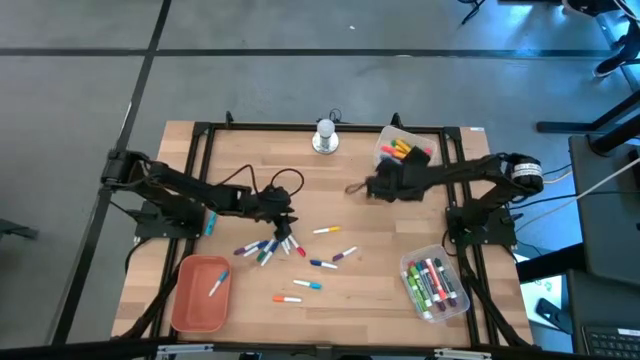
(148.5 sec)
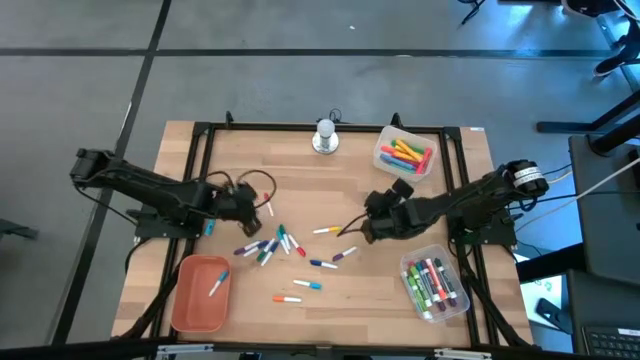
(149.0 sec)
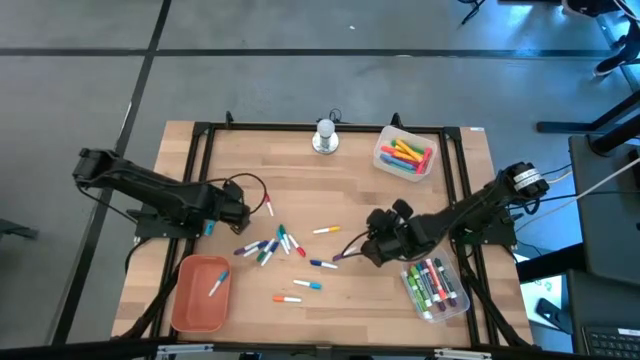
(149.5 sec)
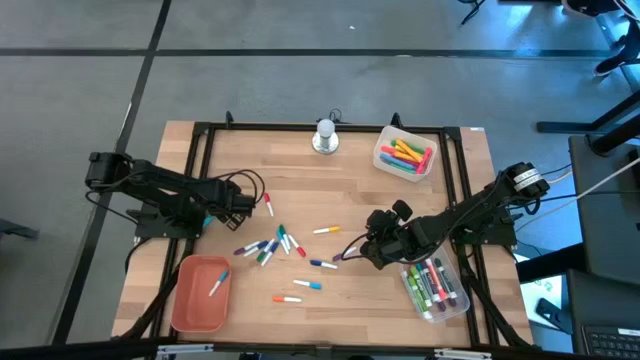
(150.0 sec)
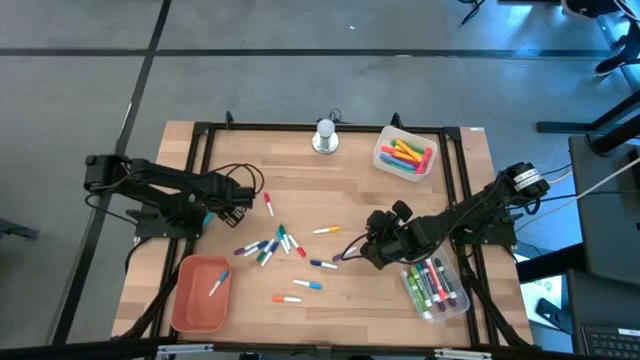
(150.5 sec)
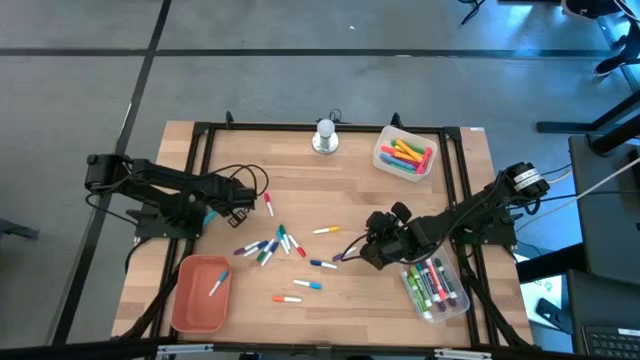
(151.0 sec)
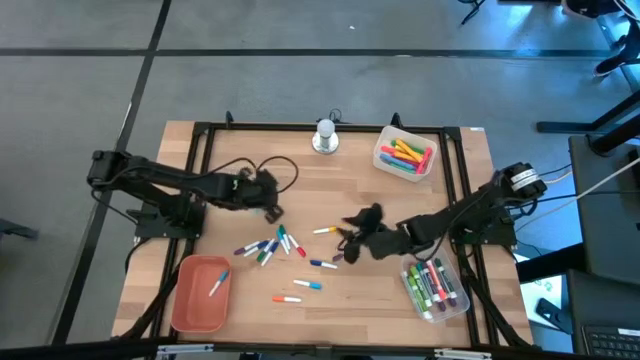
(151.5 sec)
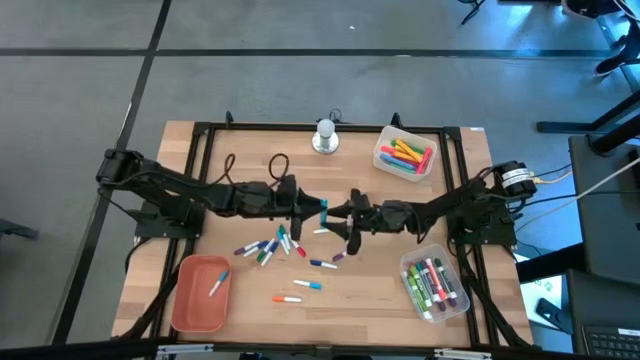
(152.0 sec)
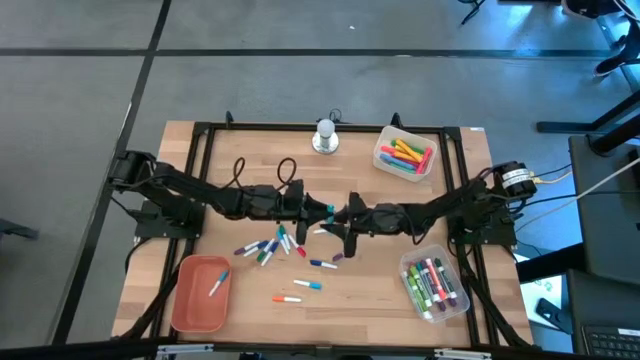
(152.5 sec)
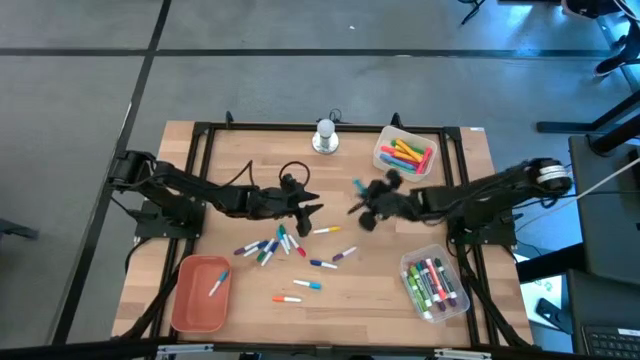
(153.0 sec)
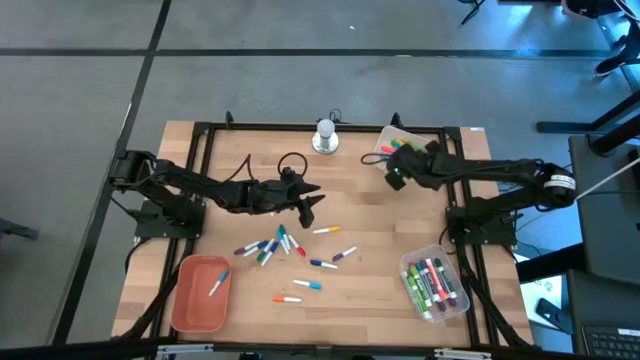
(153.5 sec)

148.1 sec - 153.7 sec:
Task: Pick & Place Markers
Put the large blue highlighter pen into the white bin

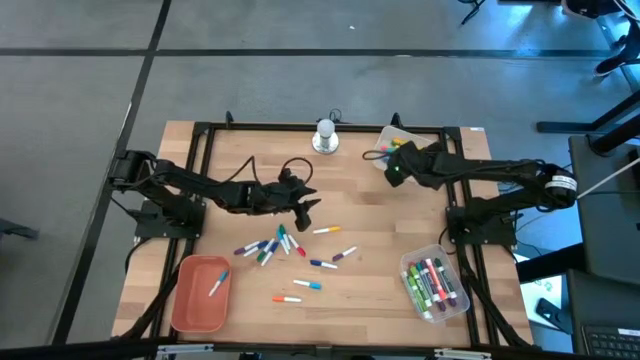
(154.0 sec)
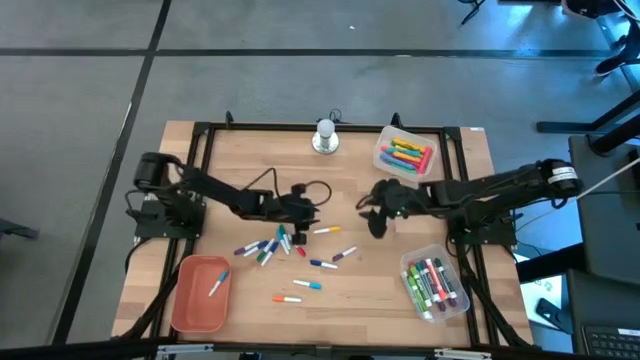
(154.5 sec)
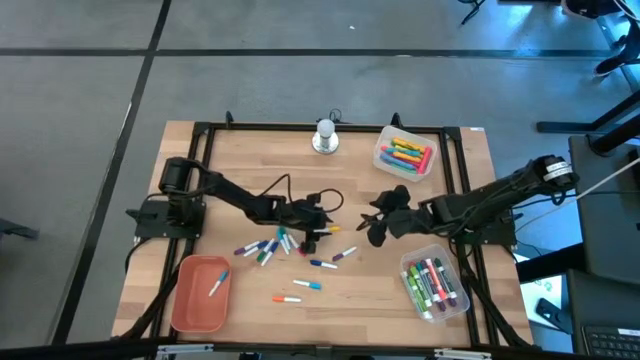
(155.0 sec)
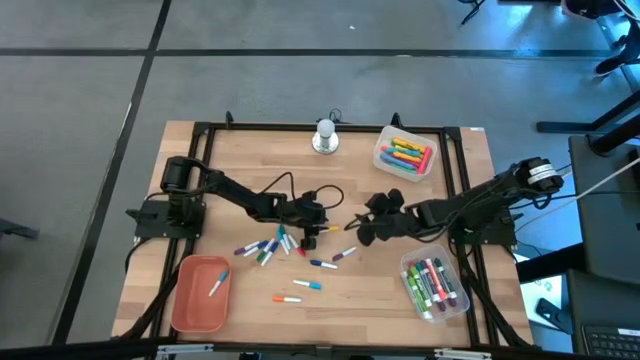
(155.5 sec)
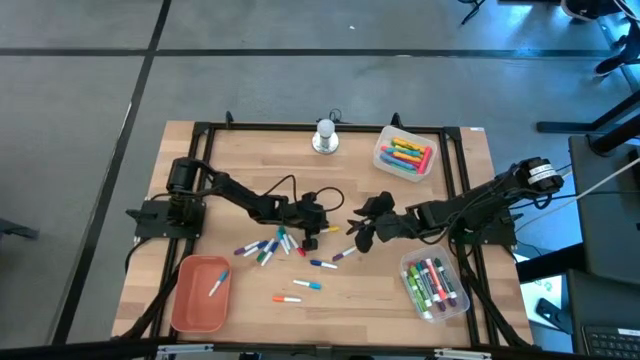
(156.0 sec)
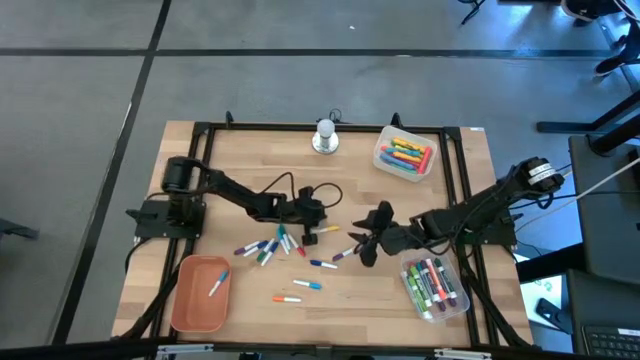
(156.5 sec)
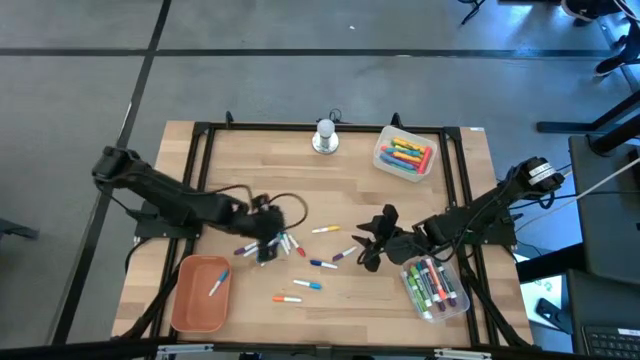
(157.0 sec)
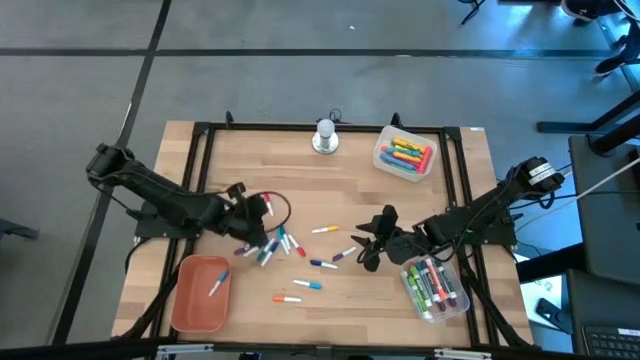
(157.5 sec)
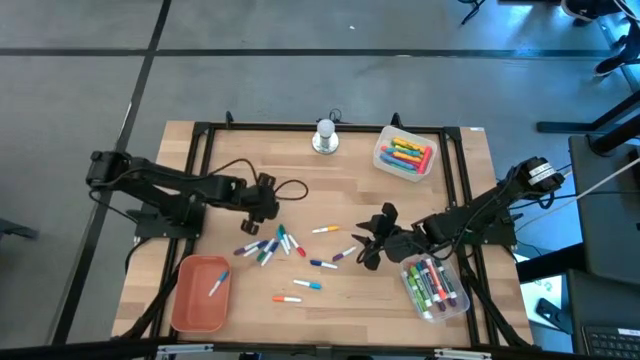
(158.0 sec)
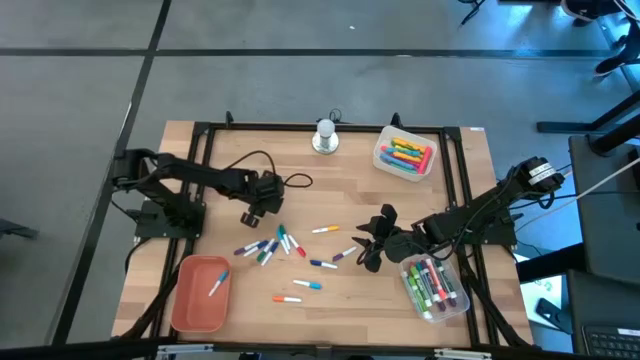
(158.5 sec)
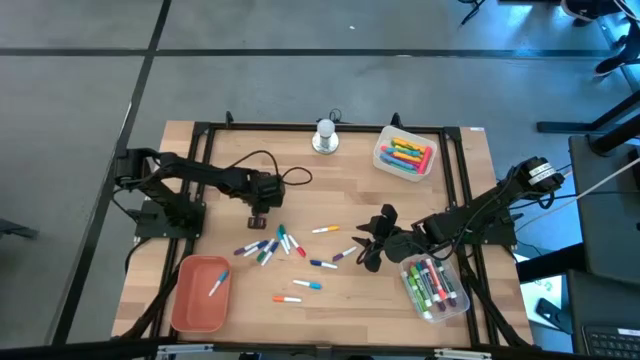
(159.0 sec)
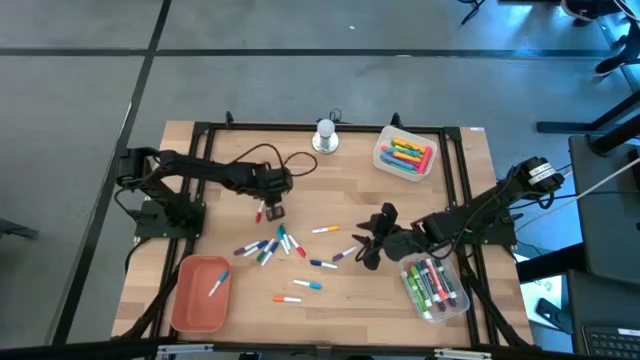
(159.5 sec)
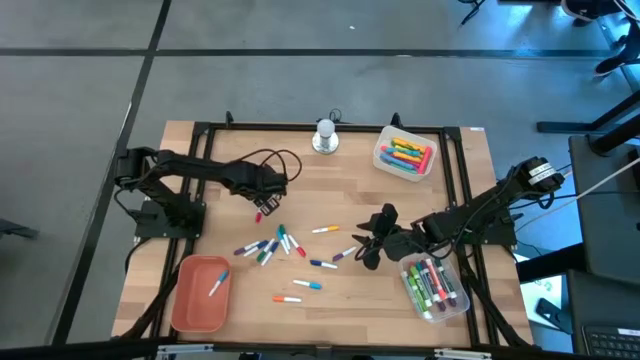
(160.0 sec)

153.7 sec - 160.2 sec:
Put the small yellow highlighter pen into the orange bin

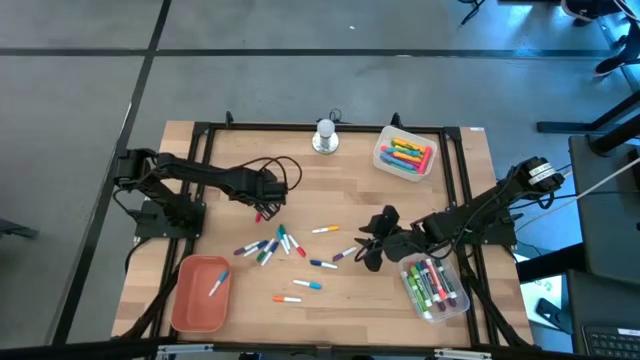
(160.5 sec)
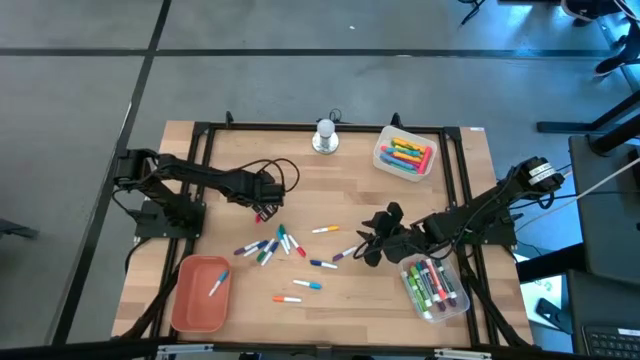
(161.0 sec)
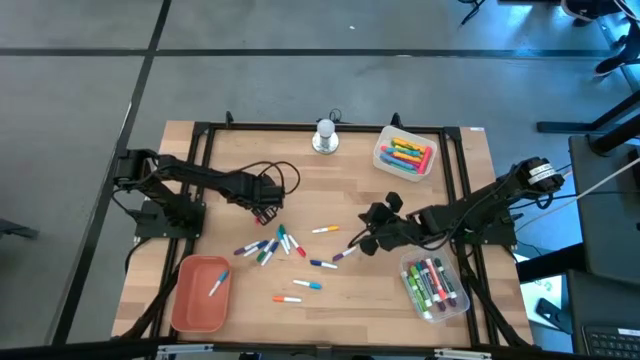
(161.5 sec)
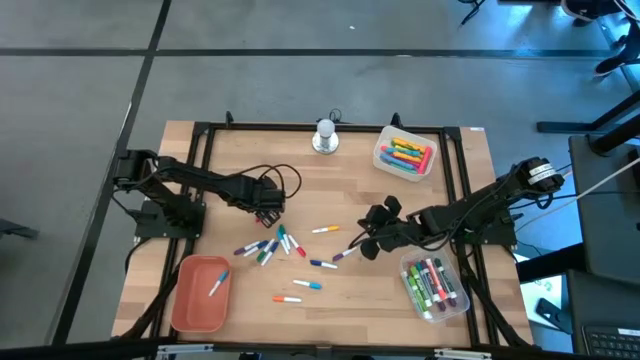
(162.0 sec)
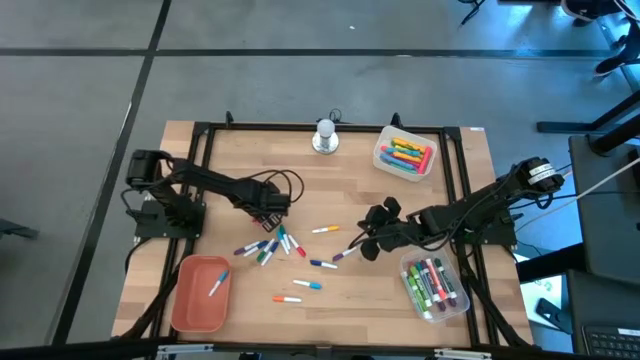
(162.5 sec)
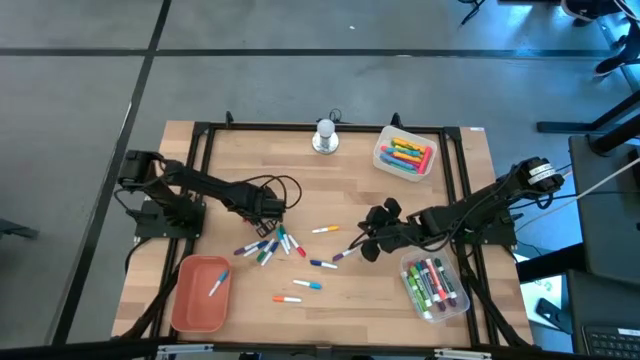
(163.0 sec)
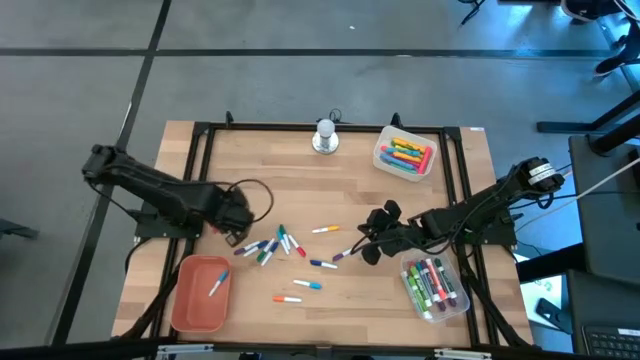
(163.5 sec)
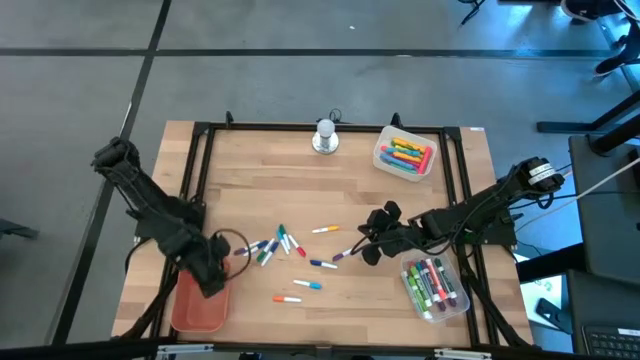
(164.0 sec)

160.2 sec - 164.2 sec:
Put the small red highlighter pen into the orange bin

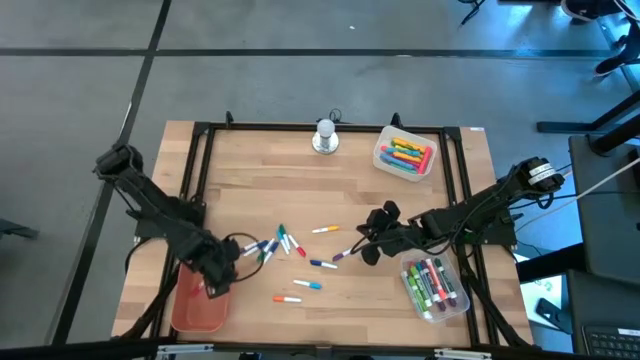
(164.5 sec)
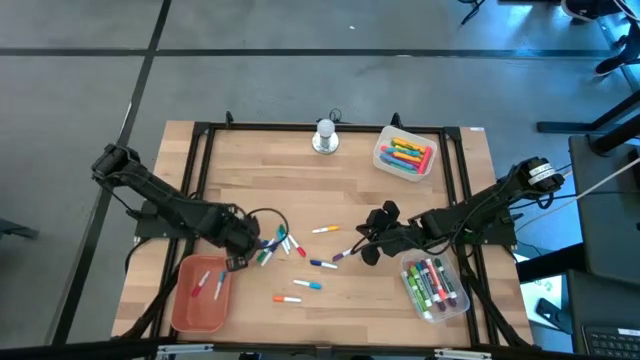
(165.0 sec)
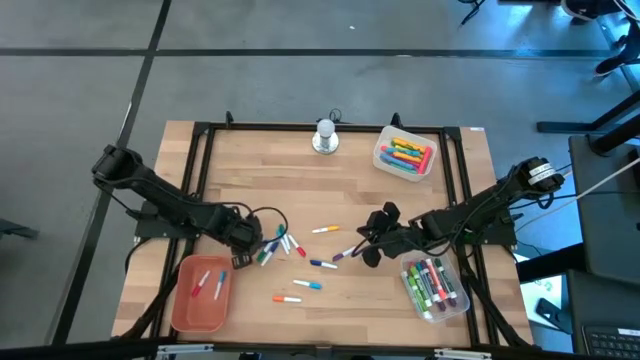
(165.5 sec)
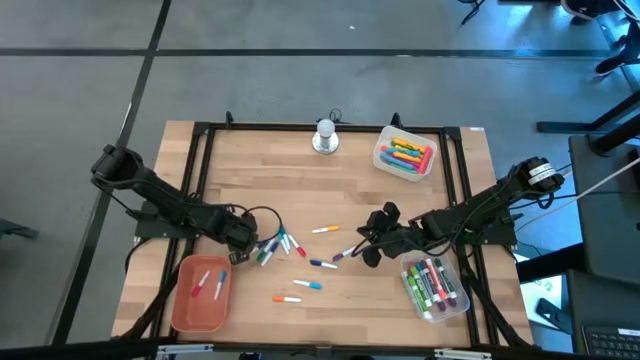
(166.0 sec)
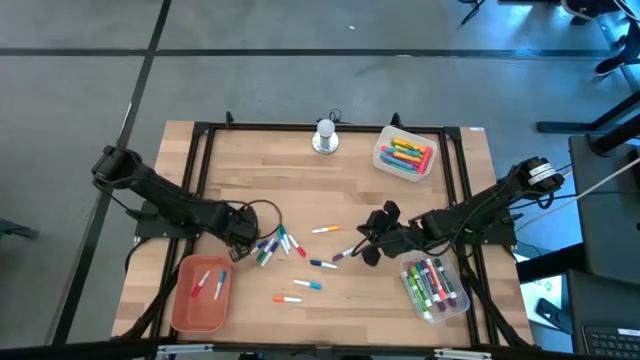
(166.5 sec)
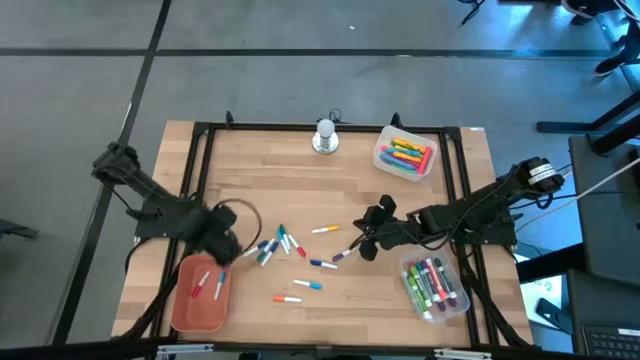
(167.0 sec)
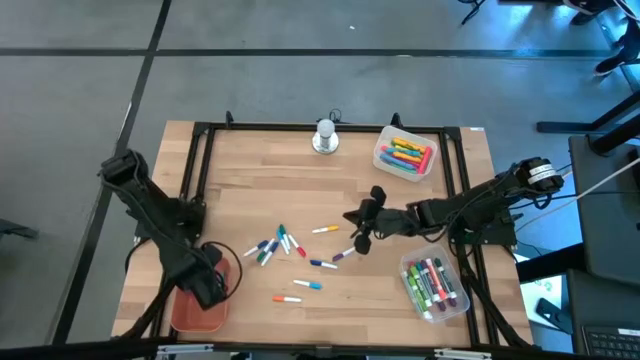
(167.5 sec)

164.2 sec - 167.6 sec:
Put the small blue highlighter pen into the orange bin

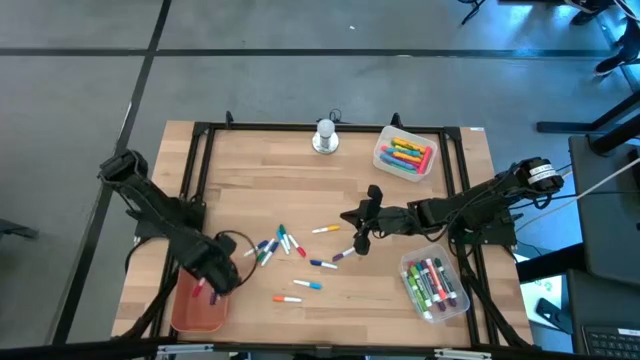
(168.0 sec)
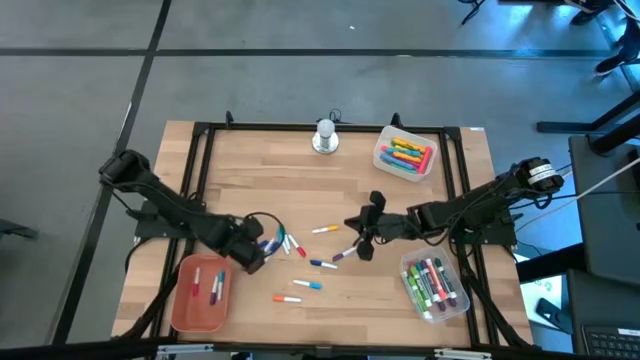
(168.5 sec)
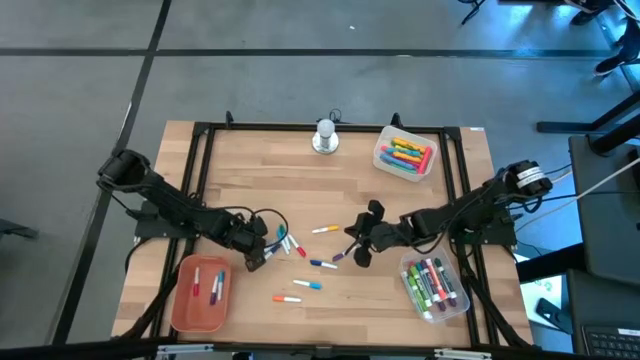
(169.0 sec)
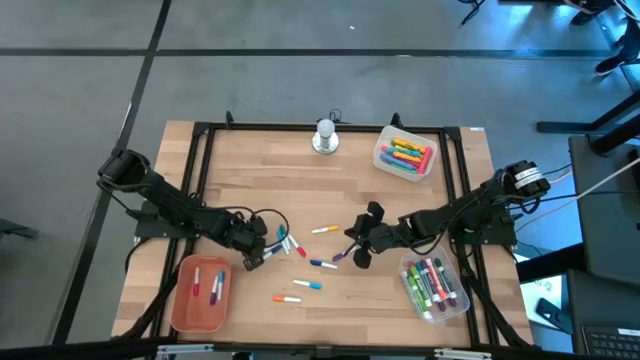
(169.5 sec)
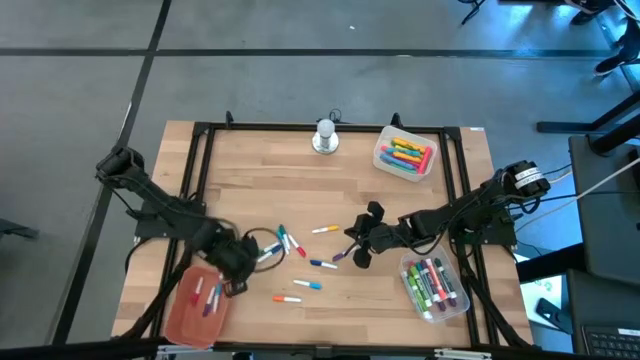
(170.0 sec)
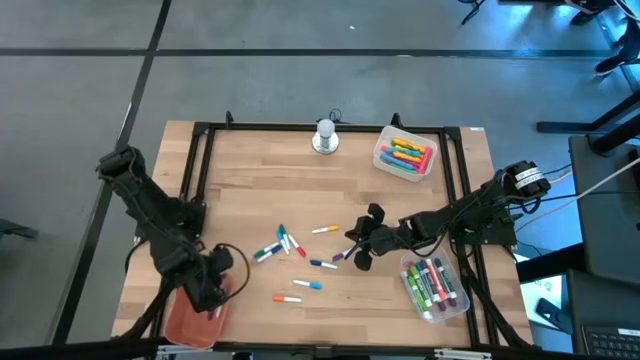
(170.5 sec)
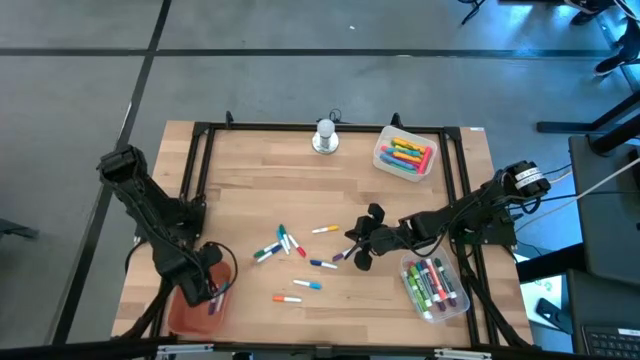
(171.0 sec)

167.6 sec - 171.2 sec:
Put the small blue highlighter pen into the orange bin
